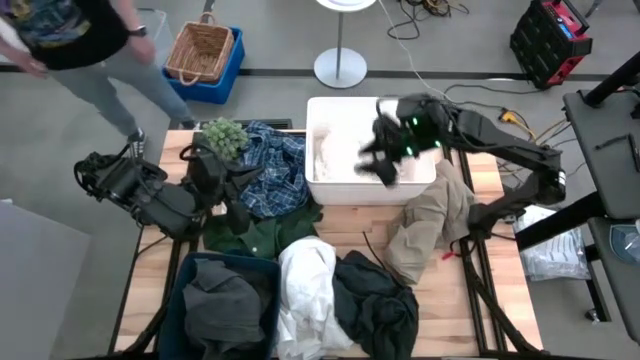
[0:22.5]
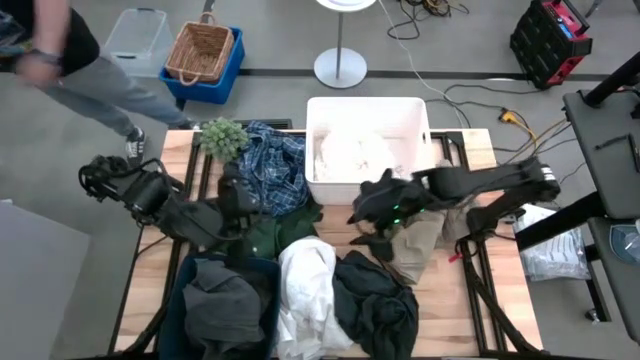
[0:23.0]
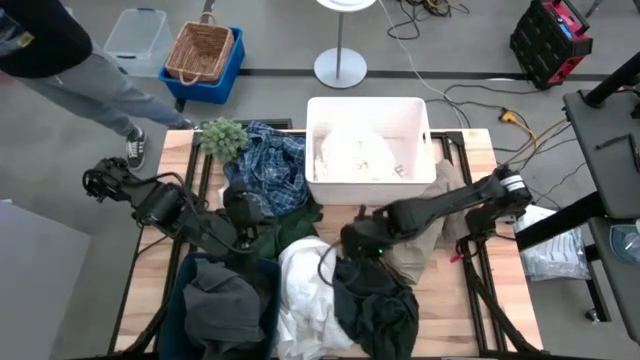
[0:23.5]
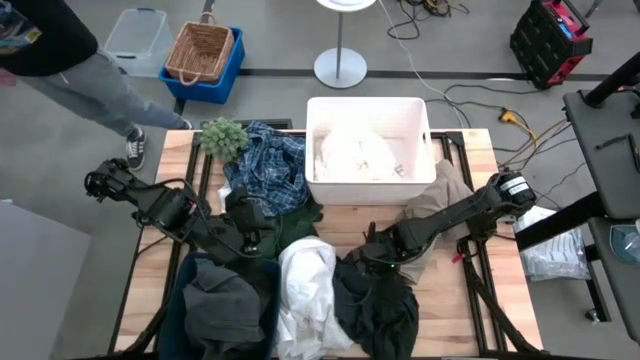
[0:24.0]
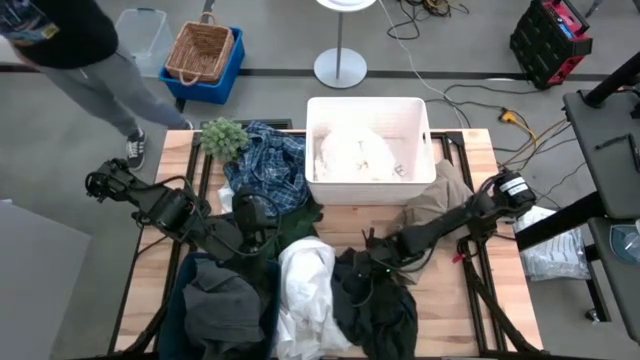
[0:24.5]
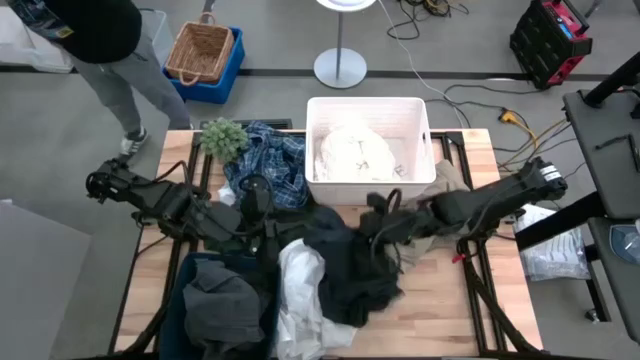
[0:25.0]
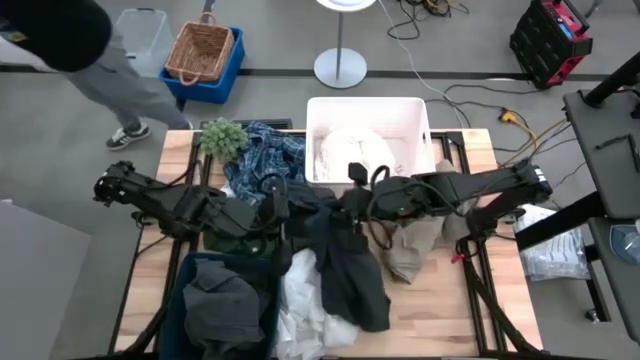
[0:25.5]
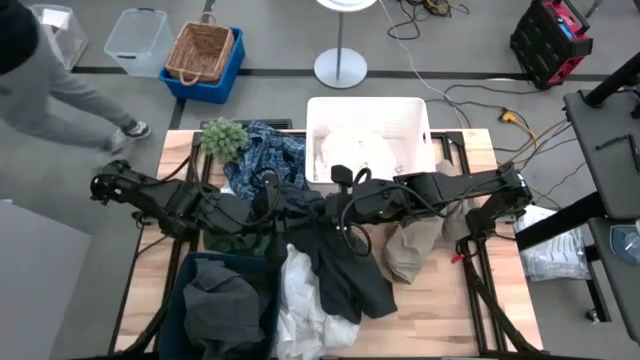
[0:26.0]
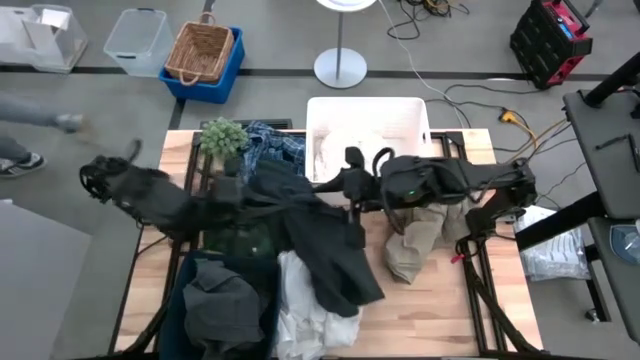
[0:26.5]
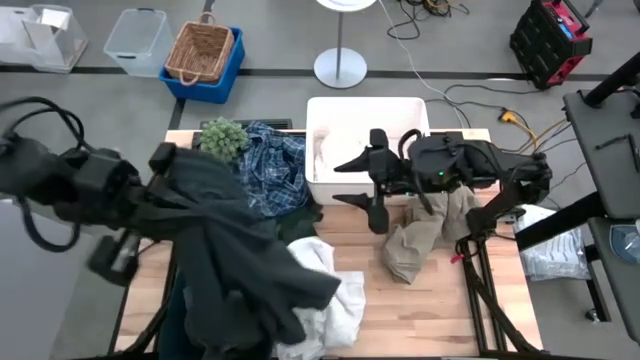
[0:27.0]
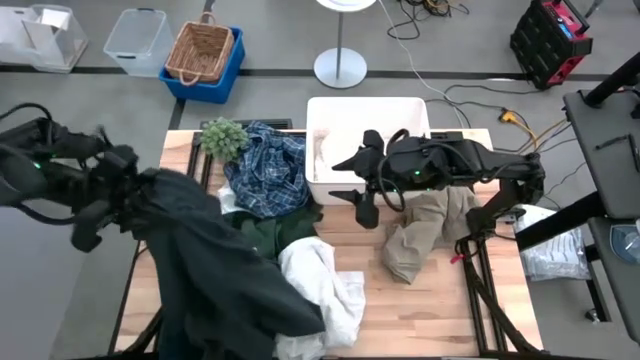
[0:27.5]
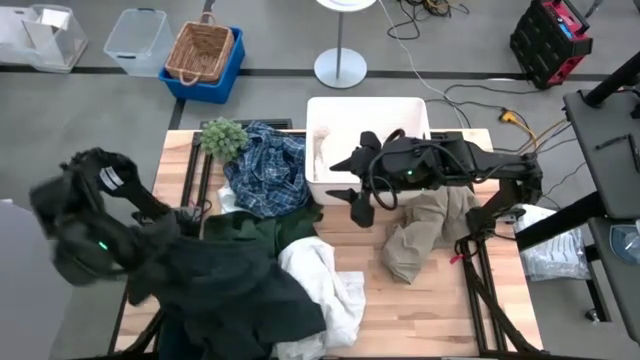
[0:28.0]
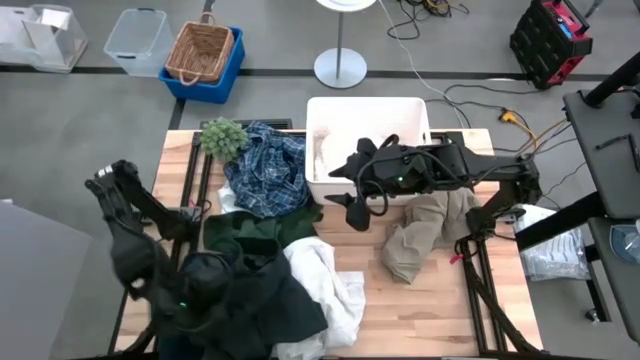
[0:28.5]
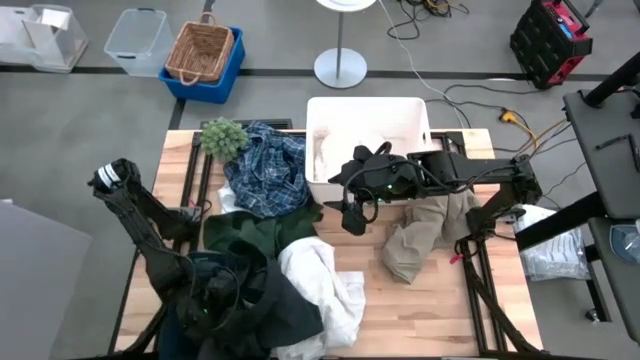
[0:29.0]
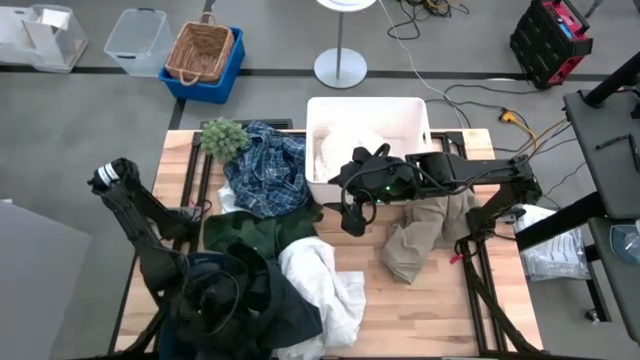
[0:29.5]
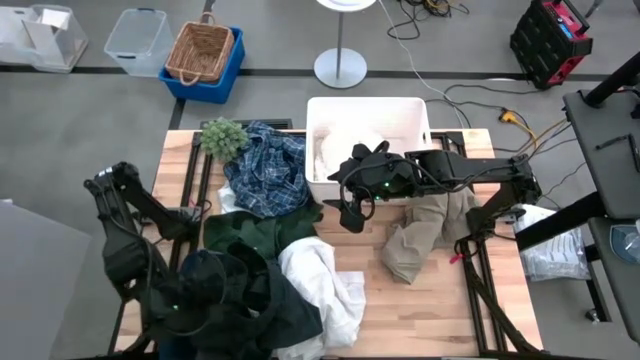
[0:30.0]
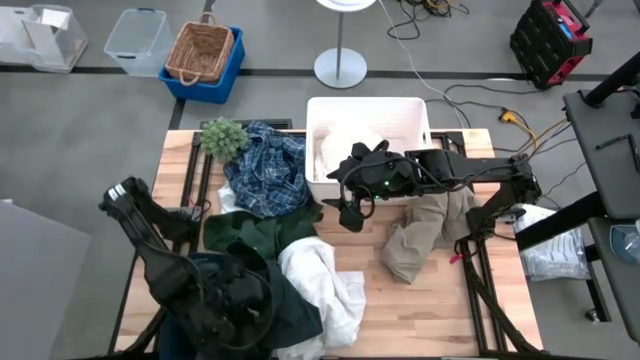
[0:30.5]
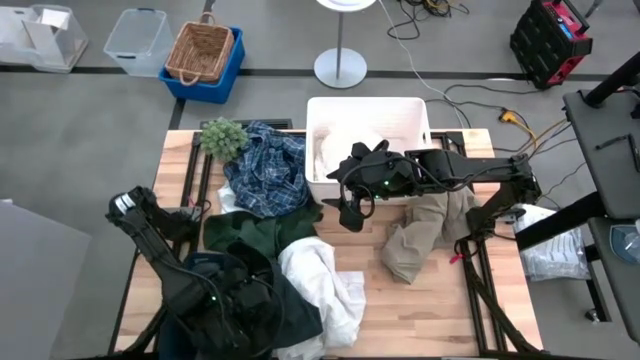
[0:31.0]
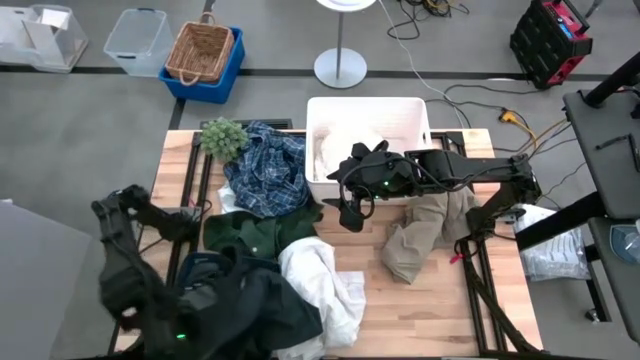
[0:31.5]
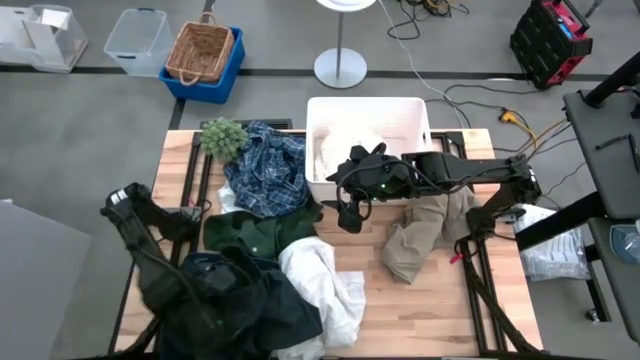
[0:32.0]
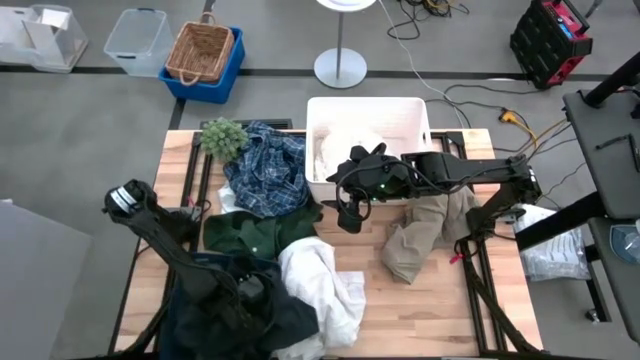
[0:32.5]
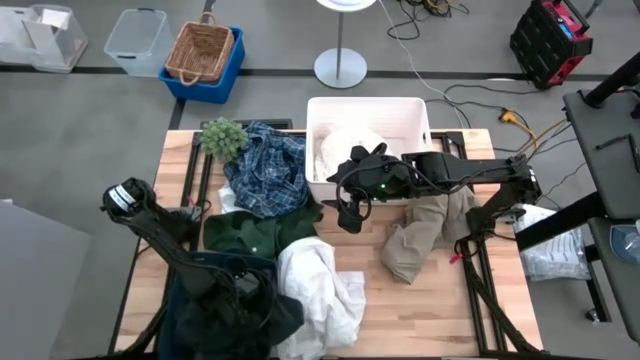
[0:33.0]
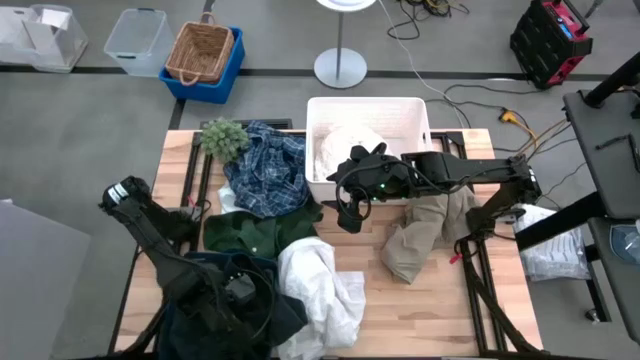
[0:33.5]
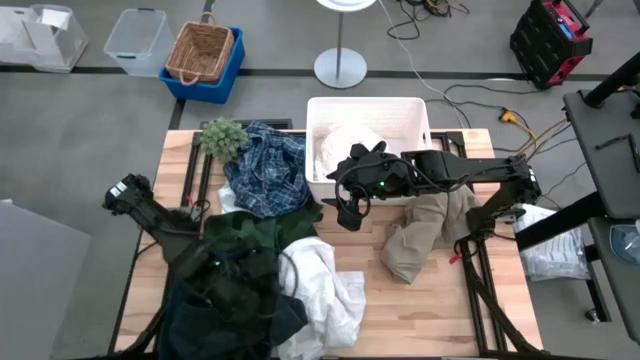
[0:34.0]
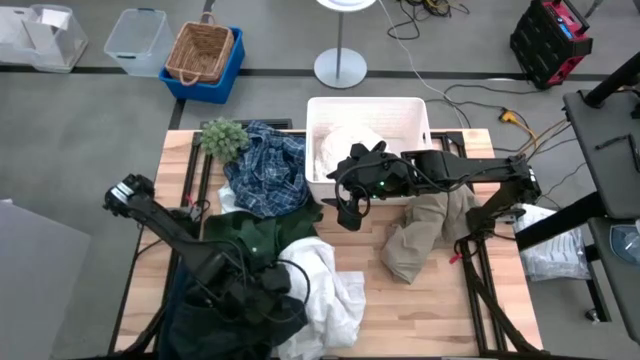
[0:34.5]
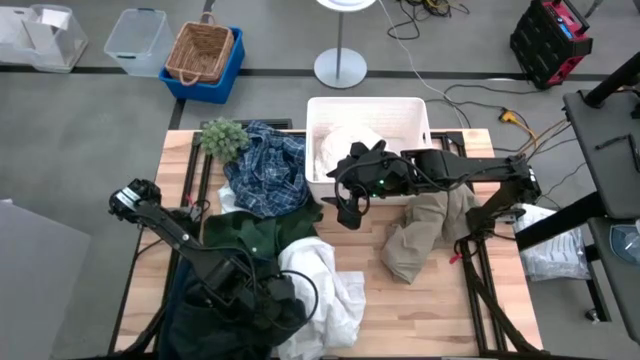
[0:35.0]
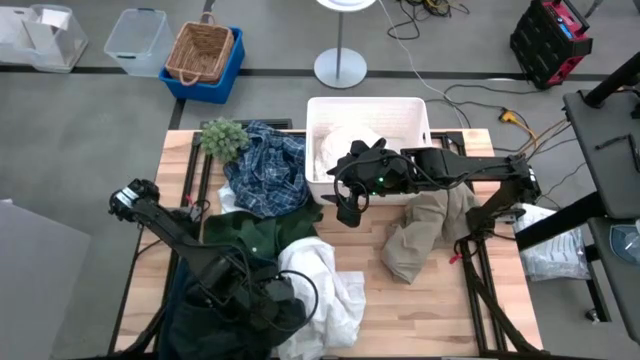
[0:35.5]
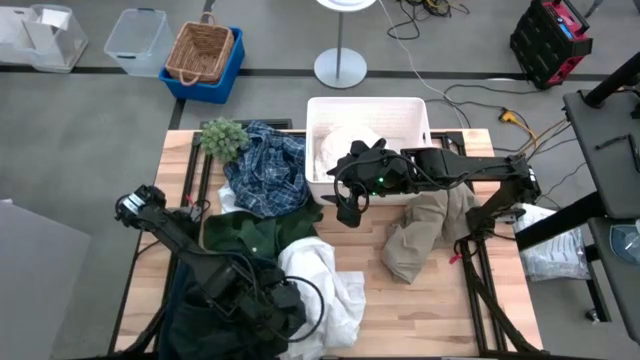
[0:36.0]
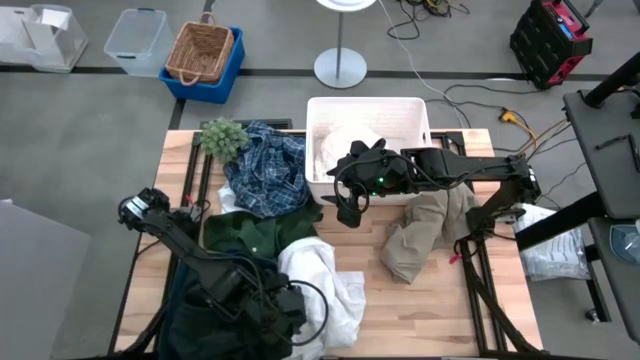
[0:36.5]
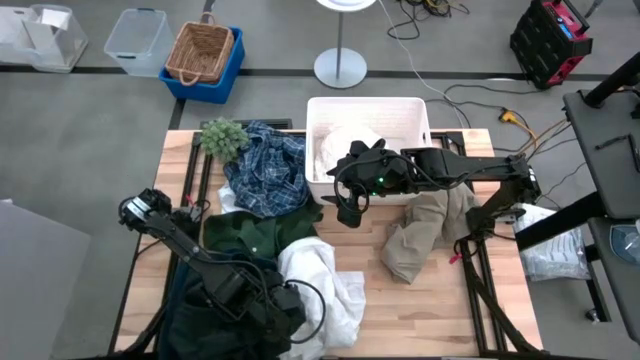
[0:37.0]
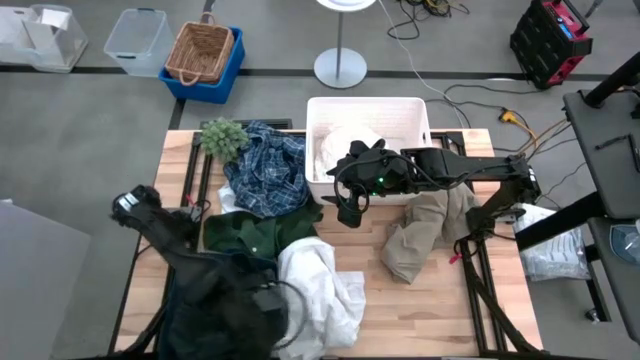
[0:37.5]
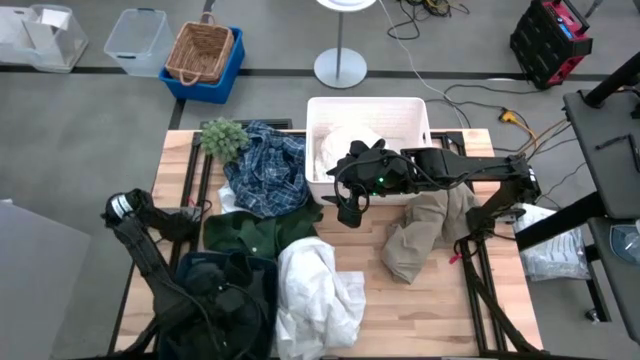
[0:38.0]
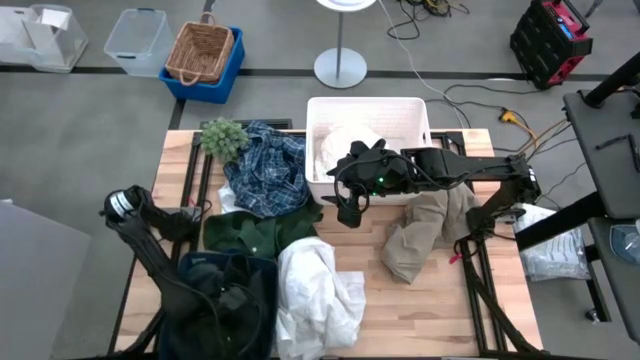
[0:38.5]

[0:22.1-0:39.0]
Task: Sort clothes
Put the dark gray shorts in the blue bin

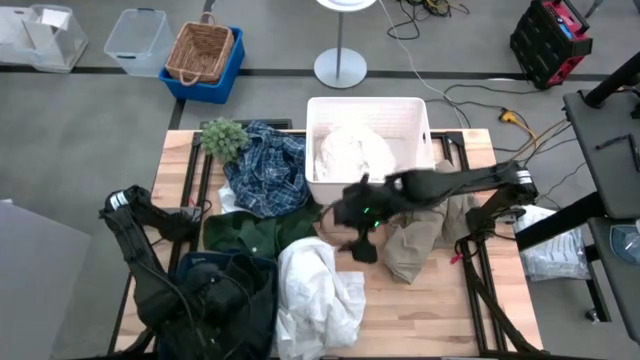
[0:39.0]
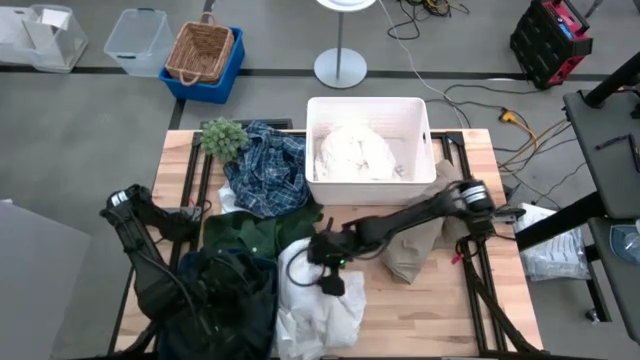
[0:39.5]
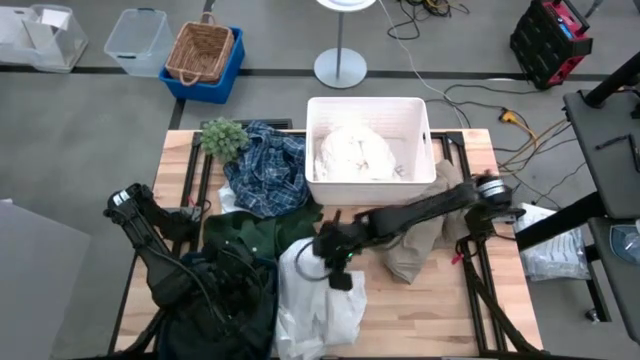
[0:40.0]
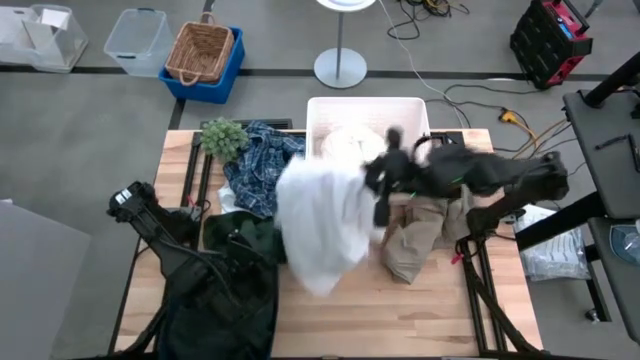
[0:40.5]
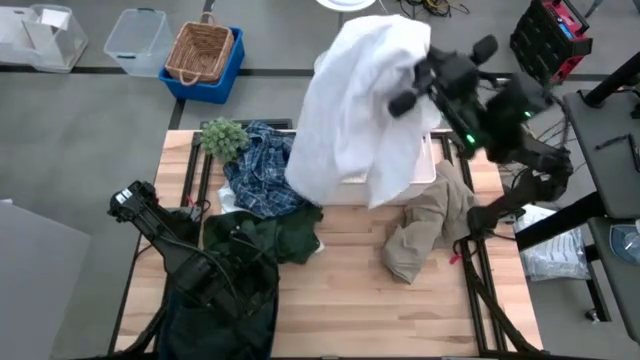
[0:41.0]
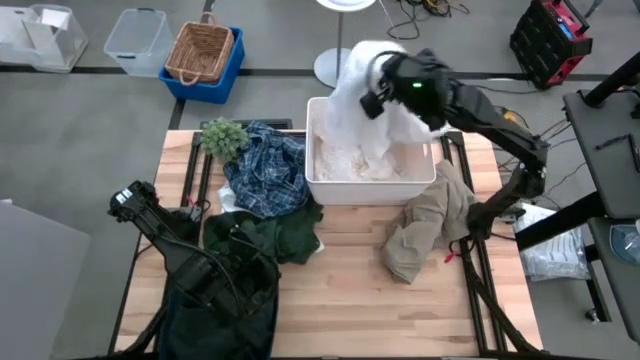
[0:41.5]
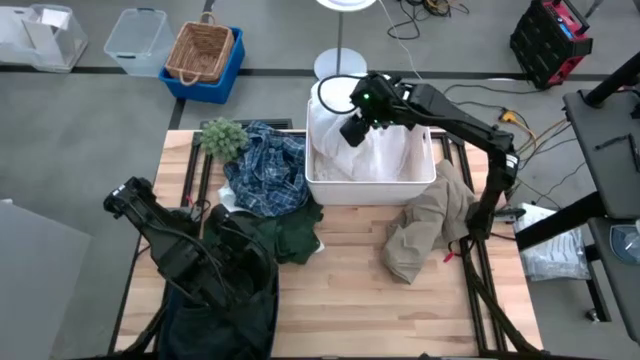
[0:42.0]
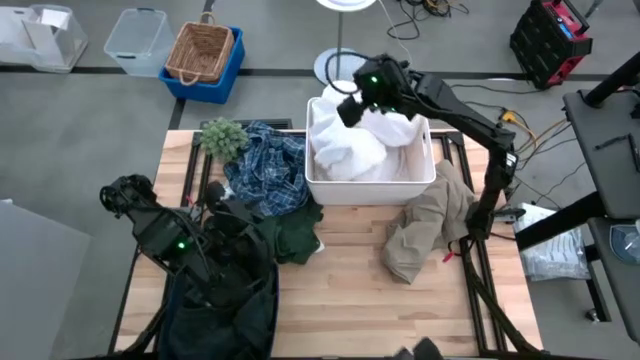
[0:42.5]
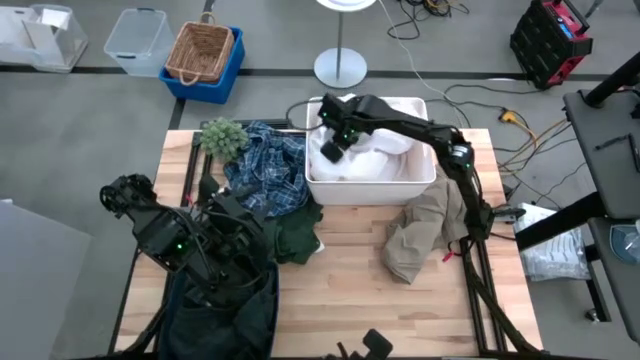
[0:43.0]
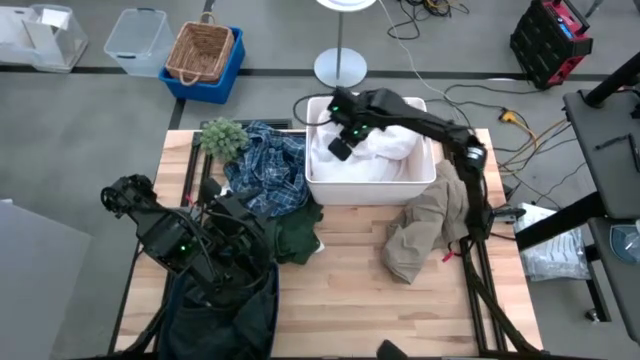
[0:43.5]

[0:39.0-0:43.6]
Put the white shirt in the white bin
